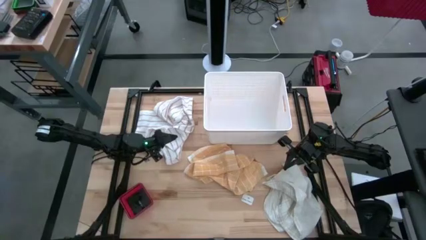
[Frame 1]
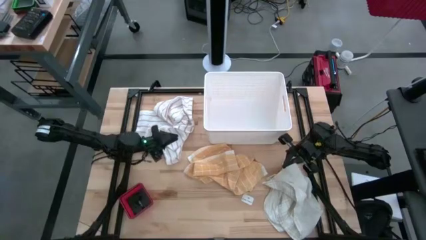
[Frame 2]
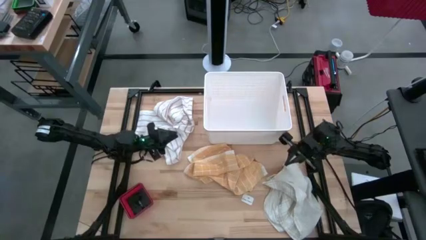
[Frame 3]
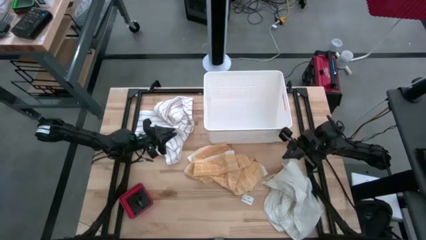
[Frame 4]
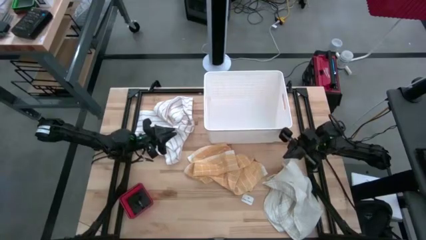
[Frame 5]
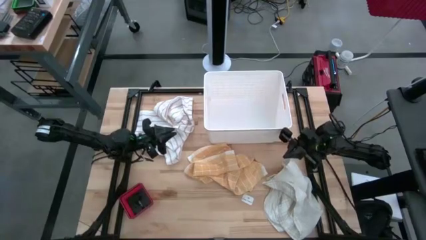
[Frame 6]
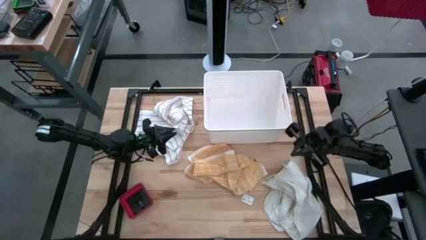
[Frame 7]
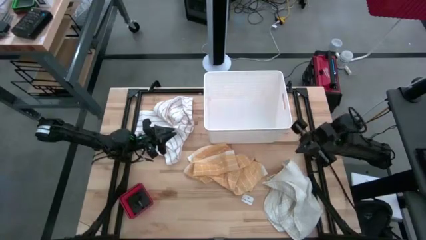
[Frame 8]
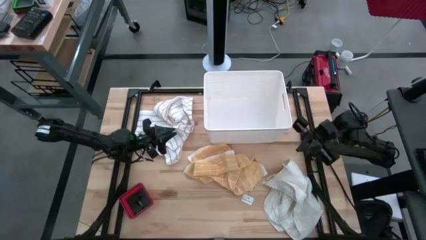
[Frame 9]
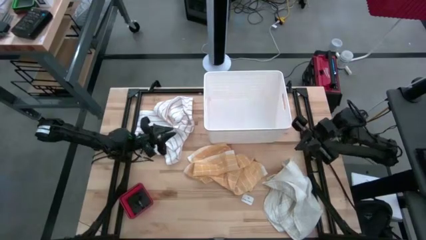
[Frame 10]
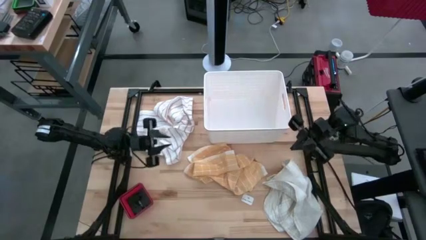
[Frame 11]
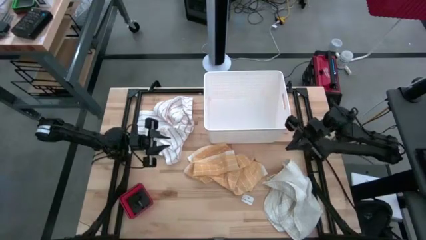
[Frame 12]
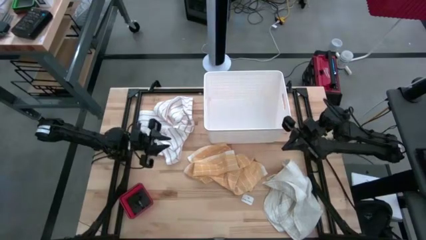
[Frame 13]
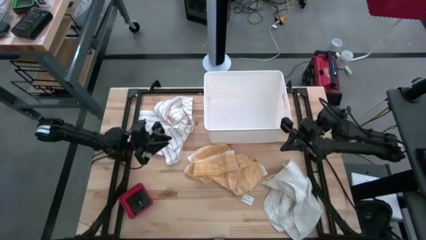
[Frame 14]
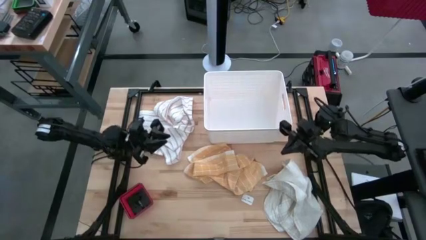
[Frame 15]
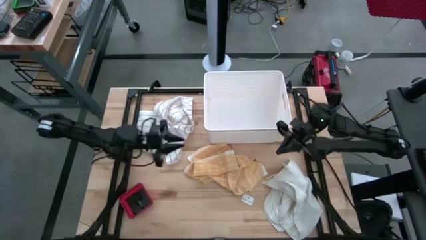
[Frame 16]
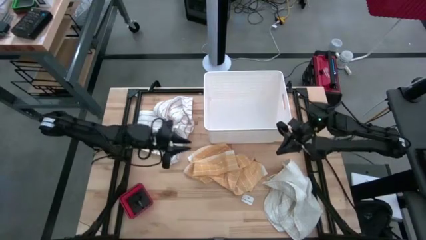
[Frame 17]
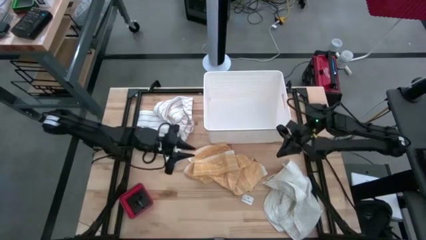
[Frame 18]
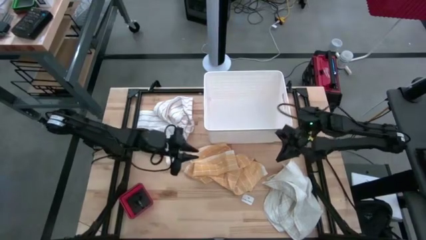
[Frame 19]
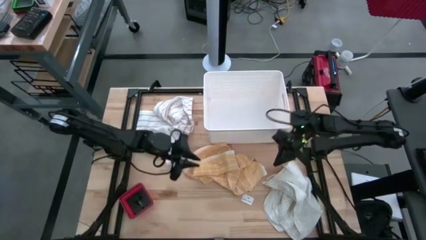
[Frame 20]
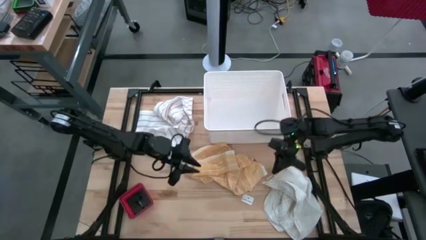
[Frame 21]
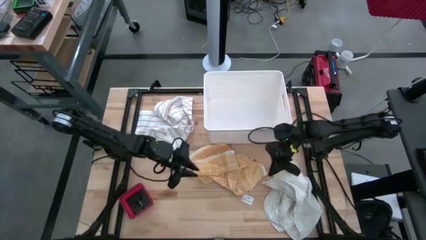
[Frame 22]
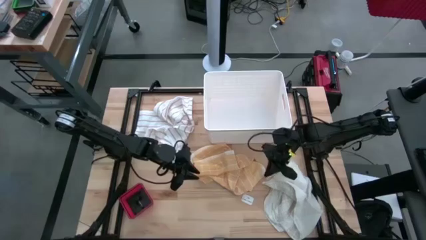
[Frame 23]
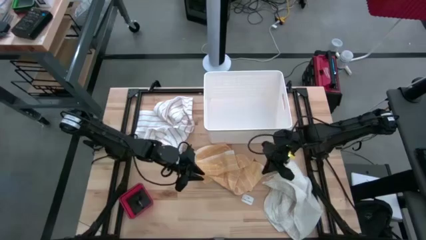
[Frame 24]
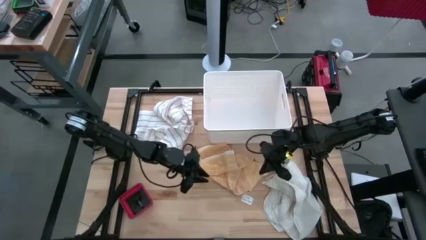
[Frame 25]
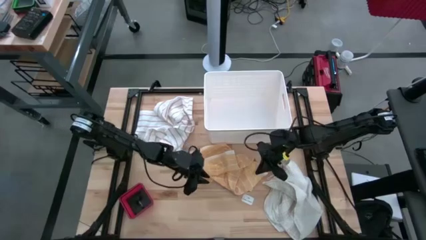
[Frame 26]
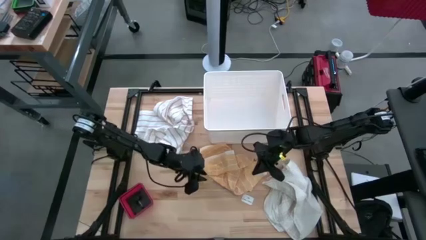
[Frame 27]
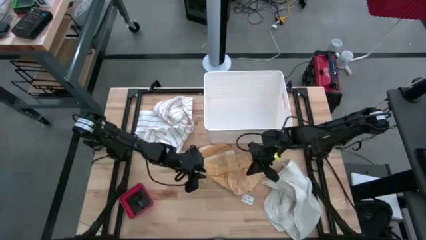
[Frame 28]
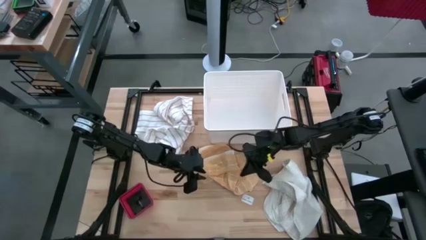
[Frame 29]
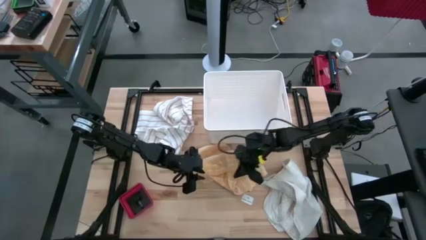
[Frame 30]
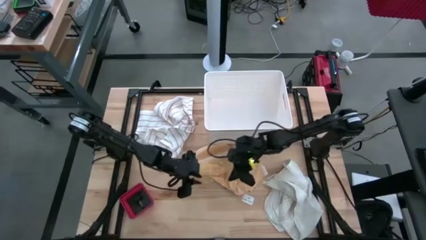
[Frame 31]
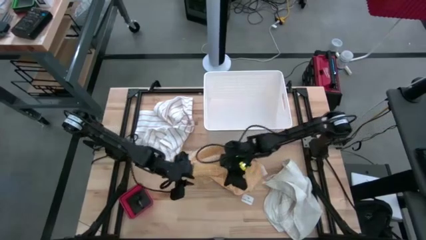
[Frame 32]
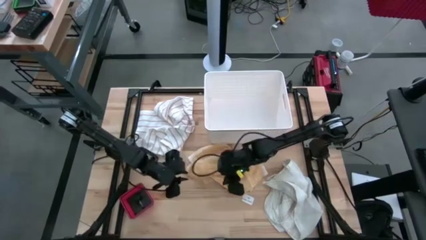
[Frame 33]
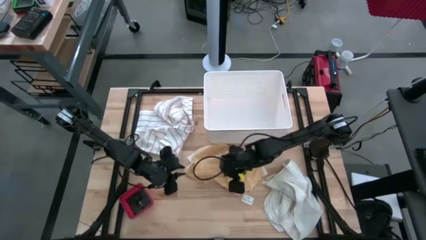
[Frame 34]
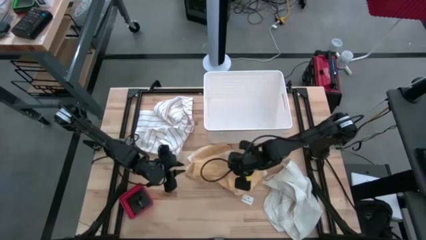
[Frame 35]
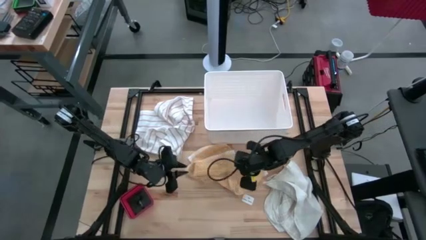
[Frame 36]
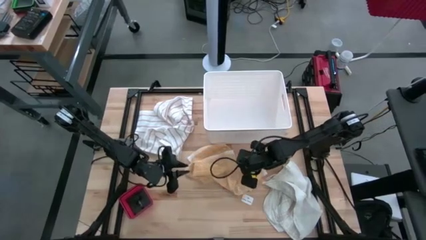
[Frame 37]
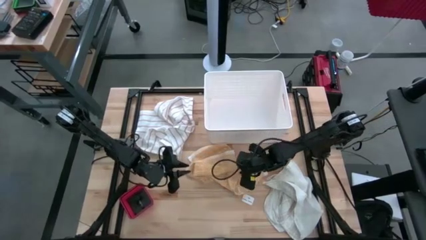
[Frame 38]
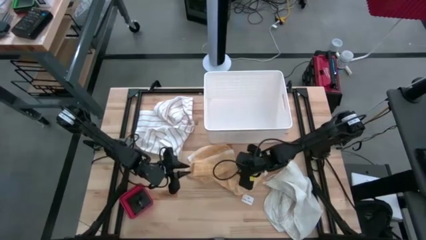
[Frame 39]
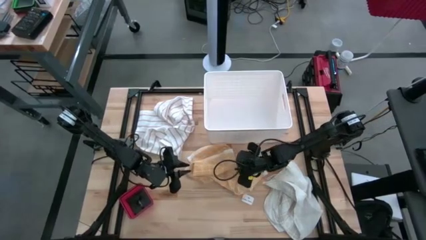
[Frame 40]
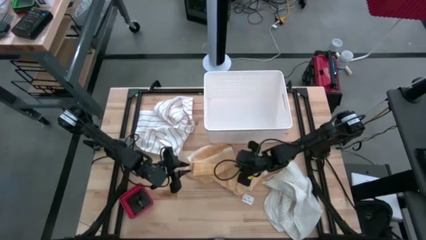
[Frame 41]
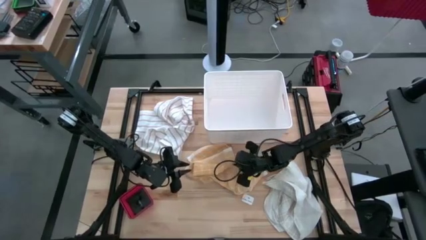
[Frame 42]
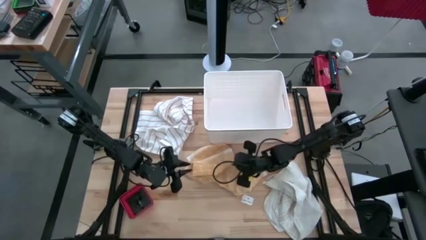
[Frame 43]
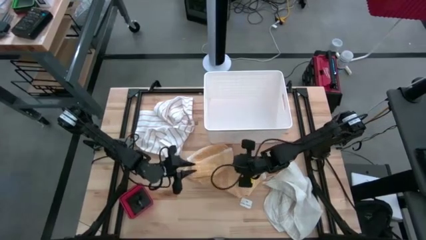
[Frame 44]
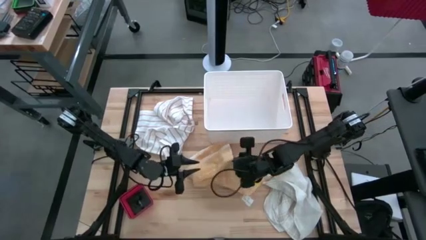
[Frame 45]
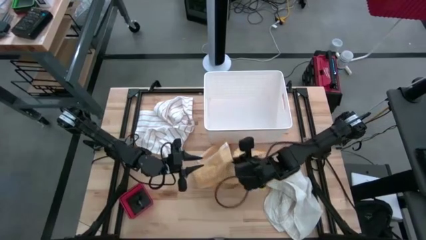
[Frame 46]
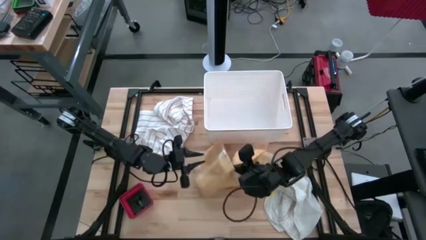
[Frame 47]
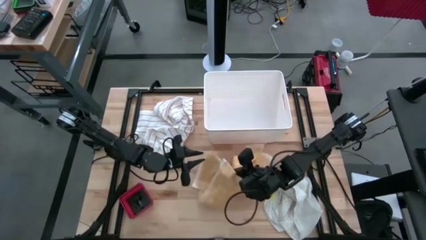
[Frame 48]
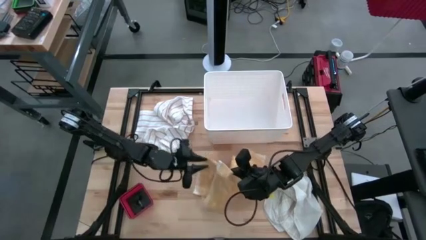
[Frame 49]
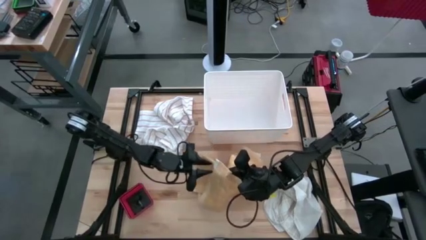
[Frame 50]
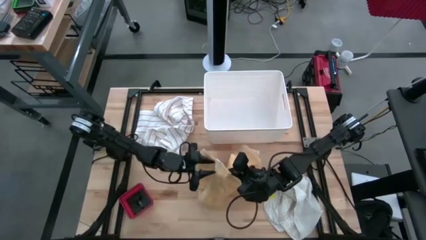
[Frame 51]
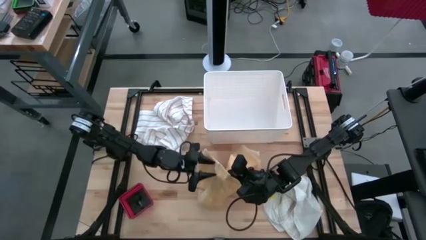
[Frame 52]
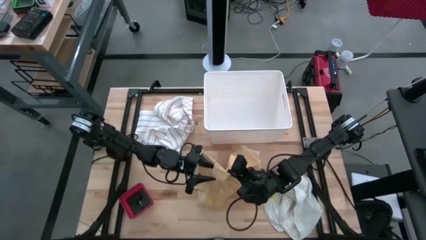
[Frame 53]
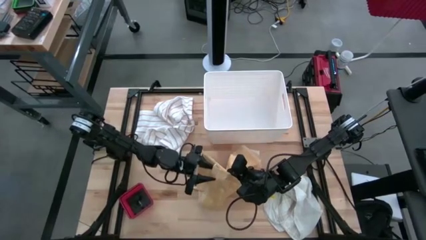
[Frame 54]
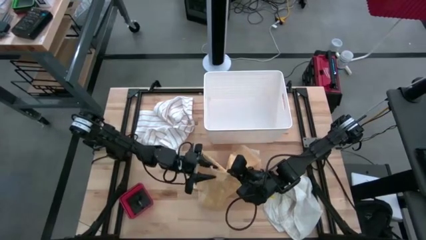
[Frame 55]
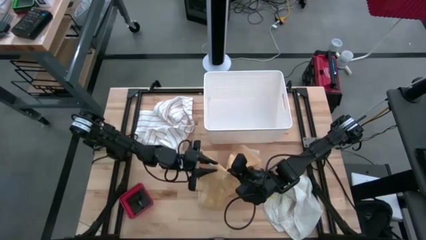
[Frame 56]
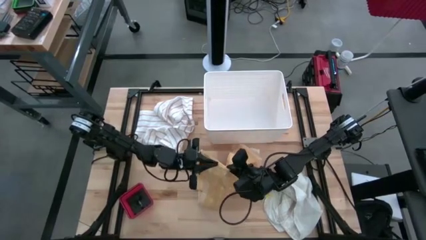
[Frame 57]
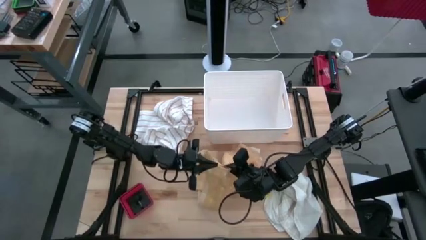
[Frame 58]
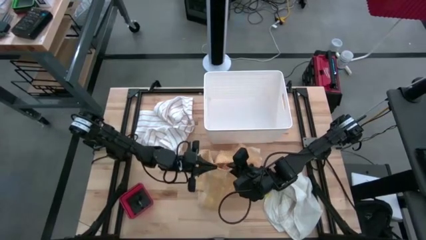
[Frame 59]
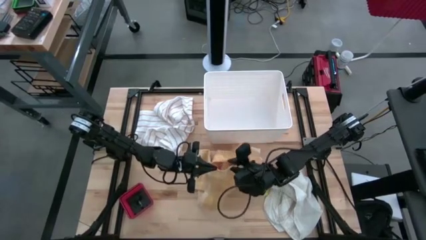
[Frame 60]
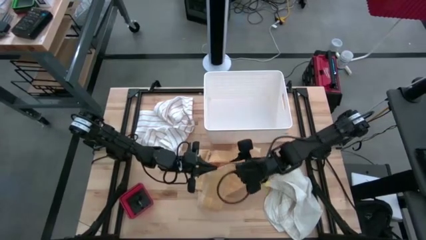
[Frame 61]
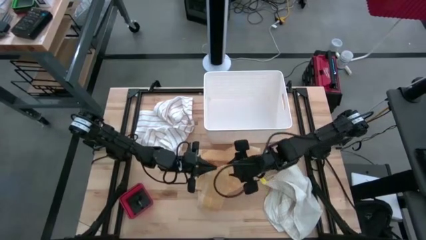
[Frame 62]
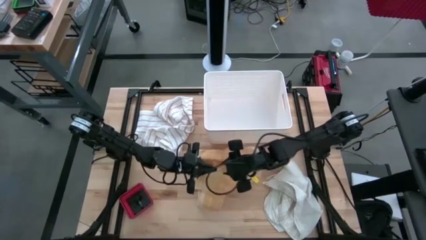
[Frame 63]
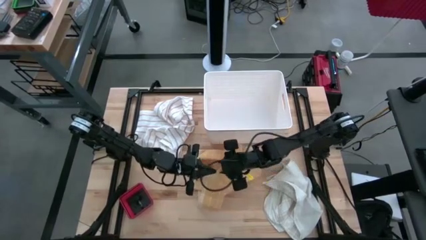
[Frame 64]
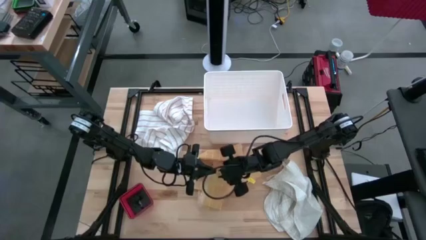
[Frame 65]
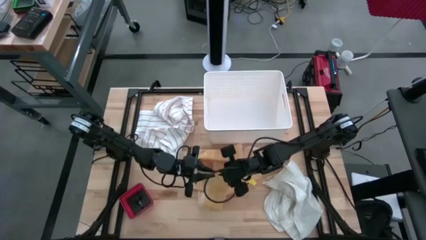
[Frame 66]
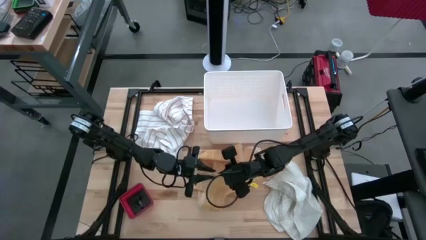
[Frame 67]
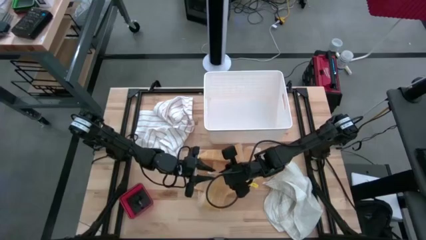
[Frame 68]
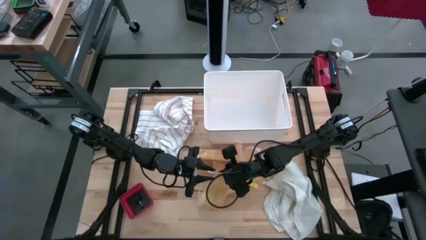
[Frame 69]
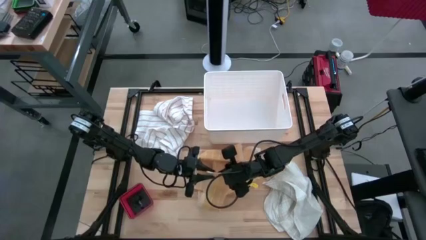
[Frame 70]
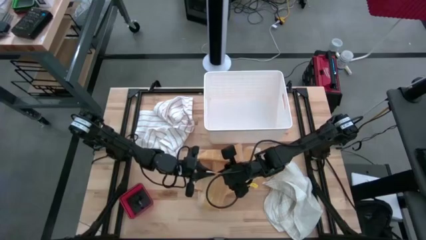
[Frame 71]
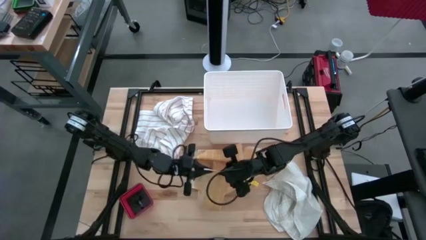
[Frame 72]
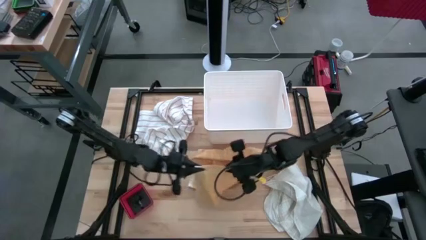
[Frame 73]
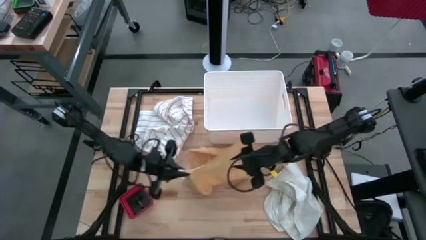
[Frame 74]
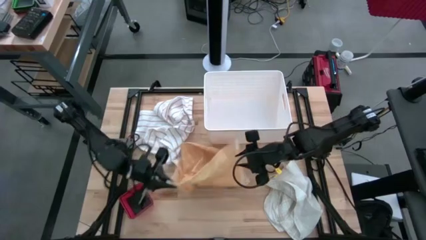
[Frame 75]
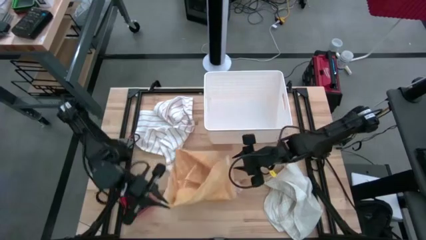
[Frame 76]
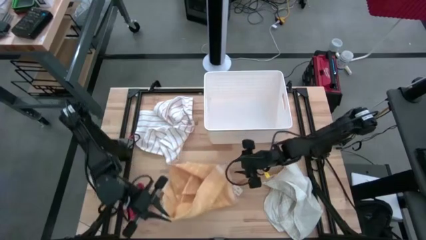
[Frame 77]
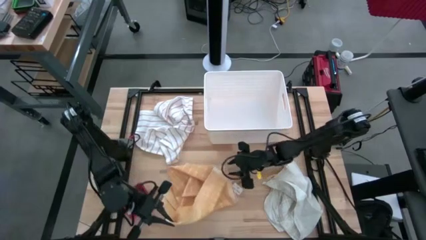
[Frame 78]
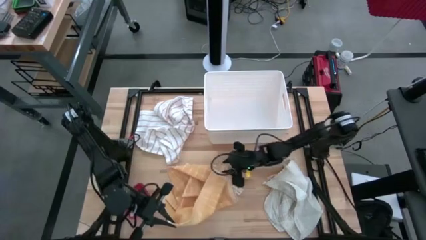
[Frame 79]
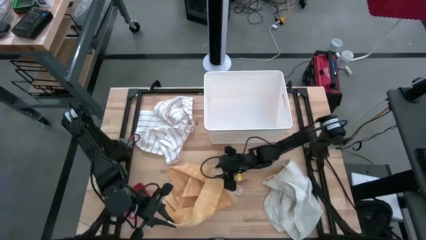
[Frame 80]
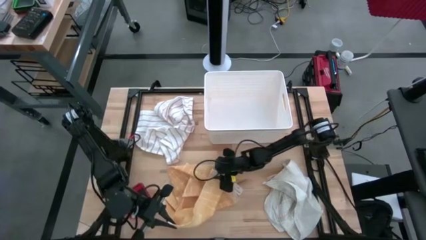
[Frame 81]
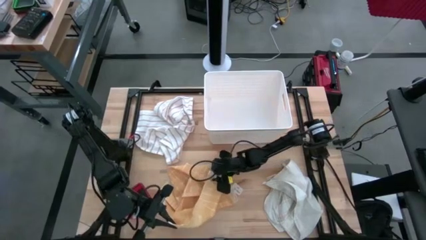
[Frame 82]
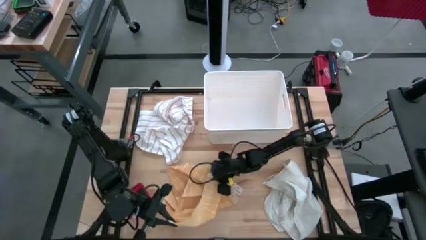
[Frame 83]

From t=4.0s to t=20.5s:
Task: Fold towel
Fold the yellow towel
